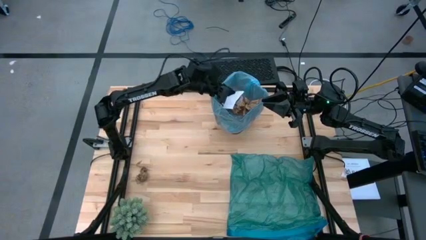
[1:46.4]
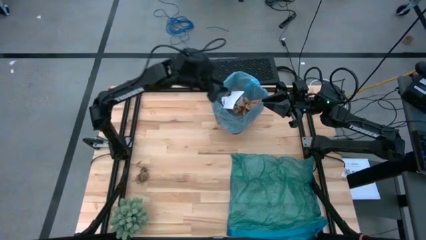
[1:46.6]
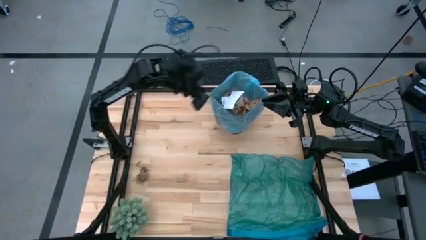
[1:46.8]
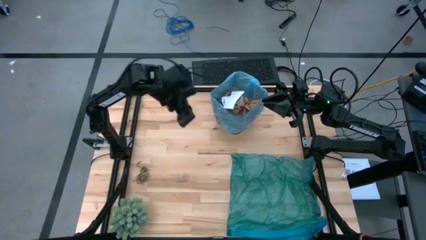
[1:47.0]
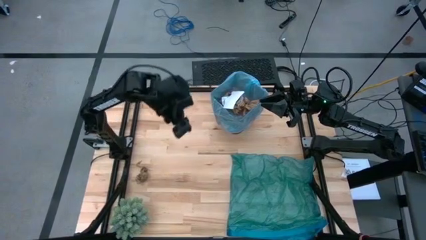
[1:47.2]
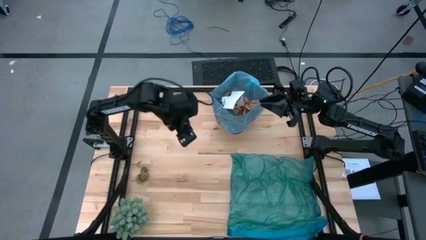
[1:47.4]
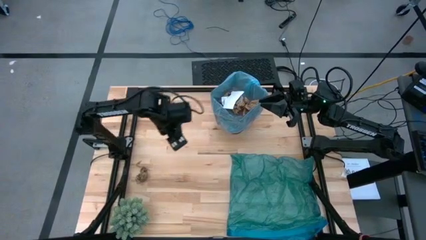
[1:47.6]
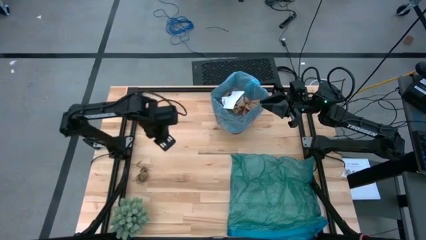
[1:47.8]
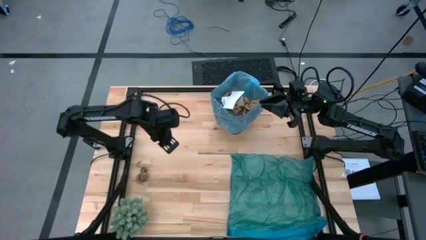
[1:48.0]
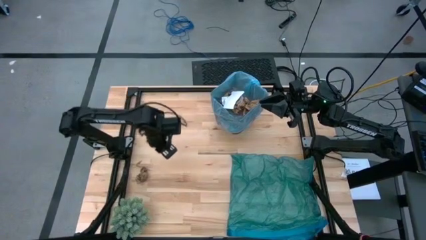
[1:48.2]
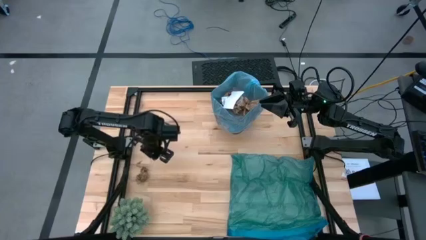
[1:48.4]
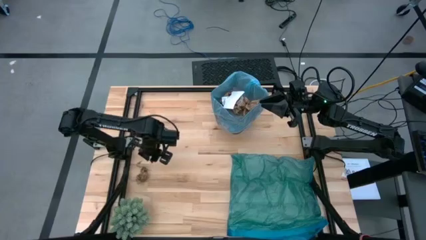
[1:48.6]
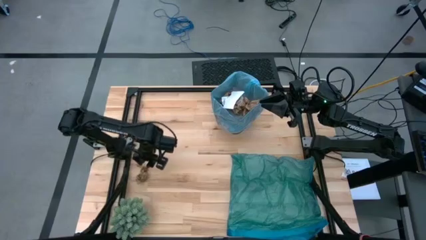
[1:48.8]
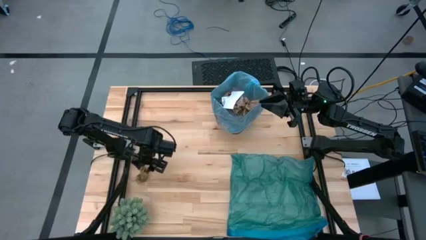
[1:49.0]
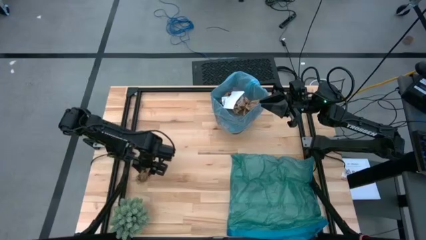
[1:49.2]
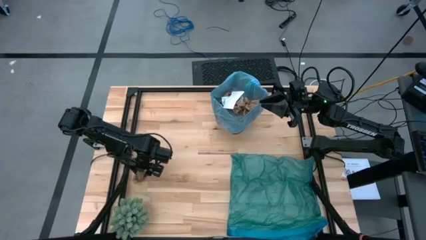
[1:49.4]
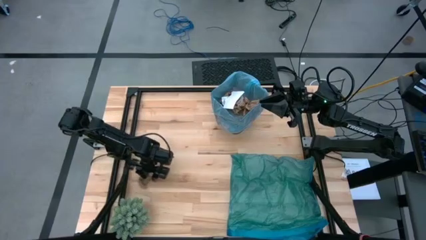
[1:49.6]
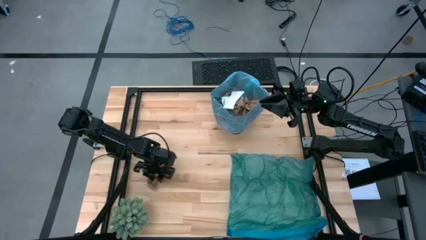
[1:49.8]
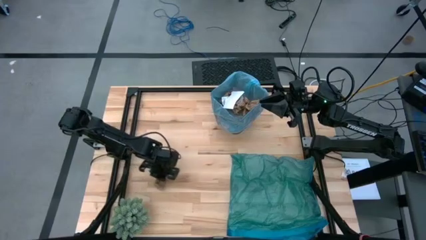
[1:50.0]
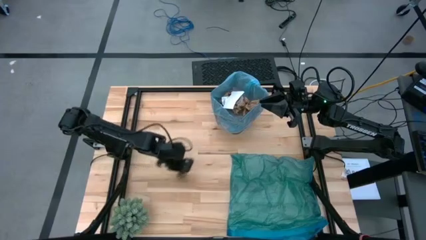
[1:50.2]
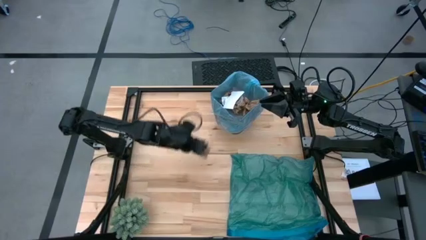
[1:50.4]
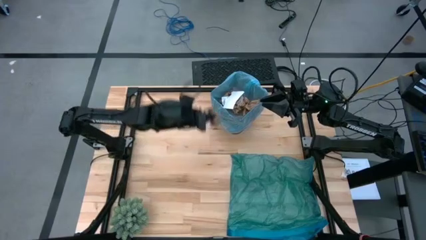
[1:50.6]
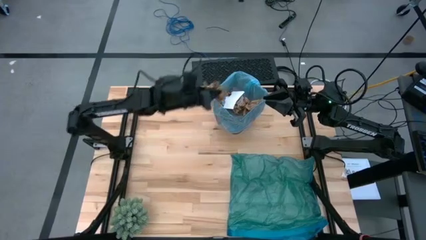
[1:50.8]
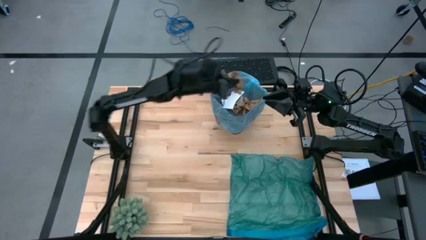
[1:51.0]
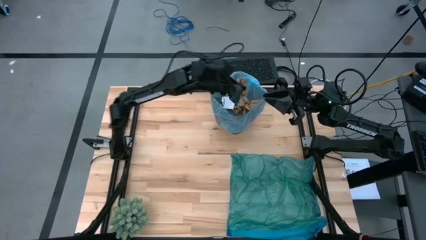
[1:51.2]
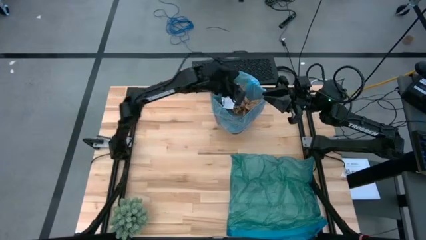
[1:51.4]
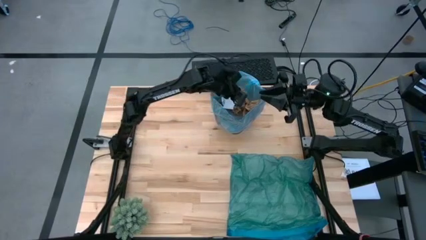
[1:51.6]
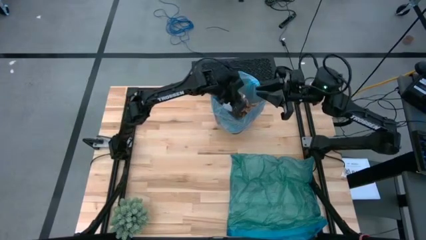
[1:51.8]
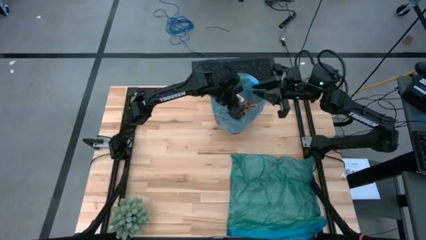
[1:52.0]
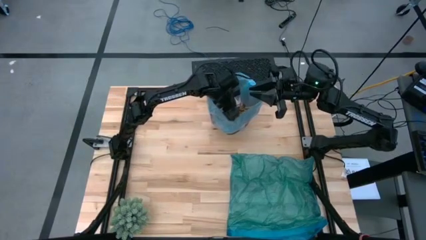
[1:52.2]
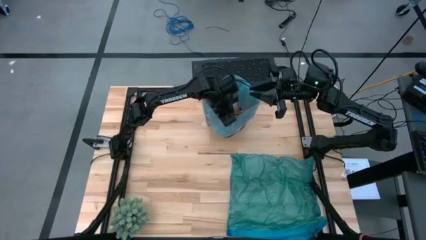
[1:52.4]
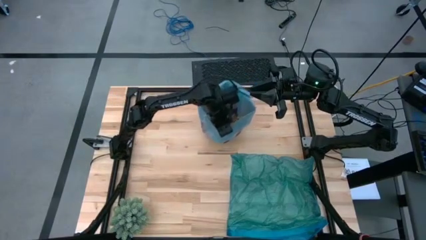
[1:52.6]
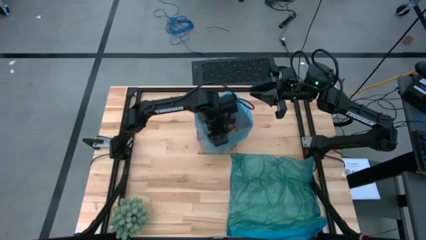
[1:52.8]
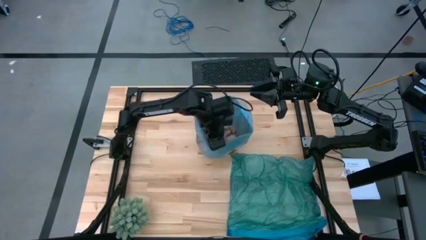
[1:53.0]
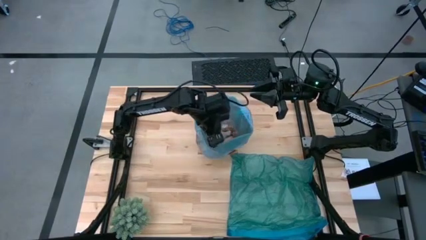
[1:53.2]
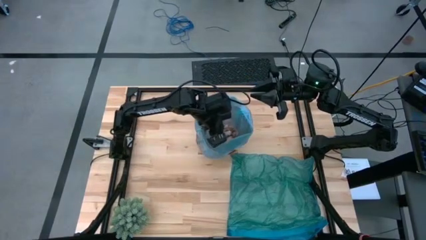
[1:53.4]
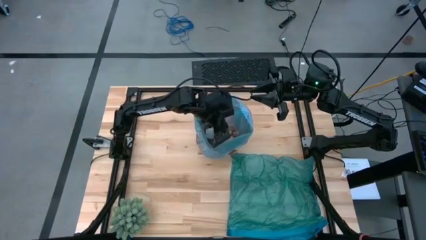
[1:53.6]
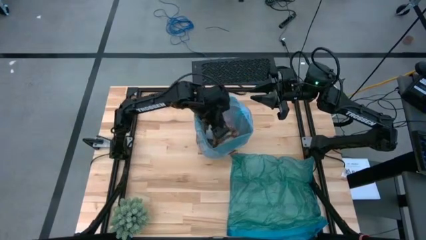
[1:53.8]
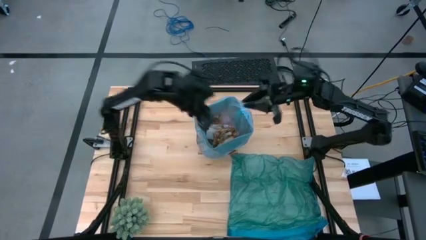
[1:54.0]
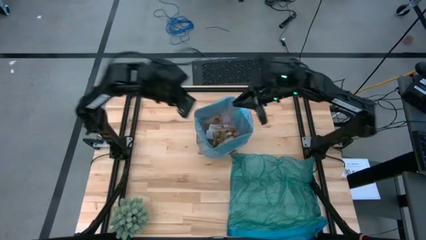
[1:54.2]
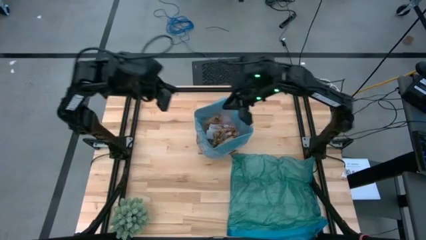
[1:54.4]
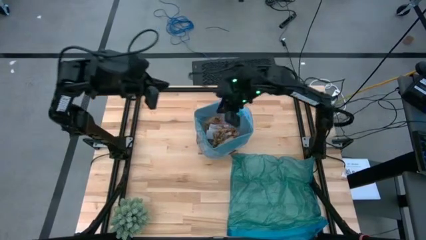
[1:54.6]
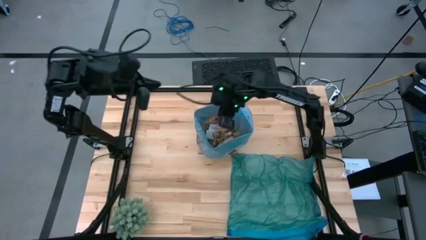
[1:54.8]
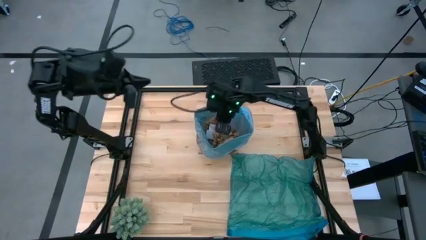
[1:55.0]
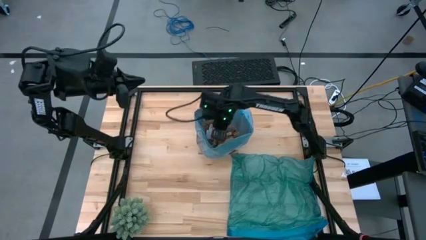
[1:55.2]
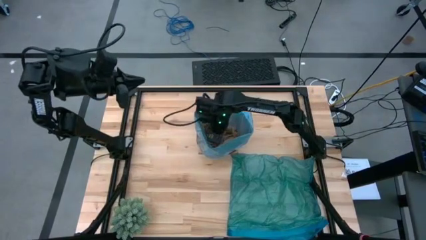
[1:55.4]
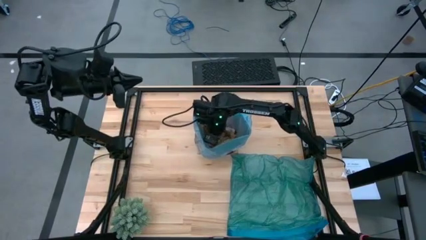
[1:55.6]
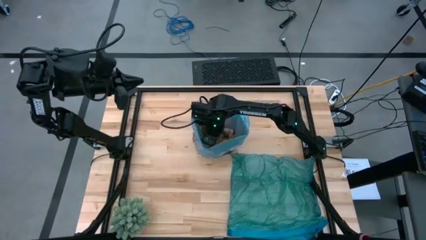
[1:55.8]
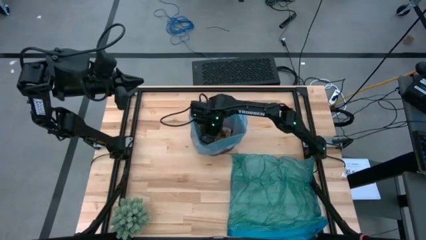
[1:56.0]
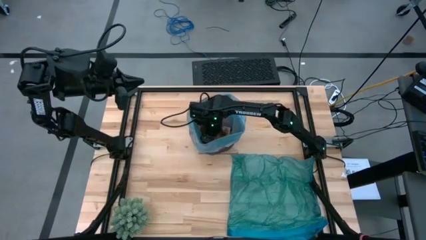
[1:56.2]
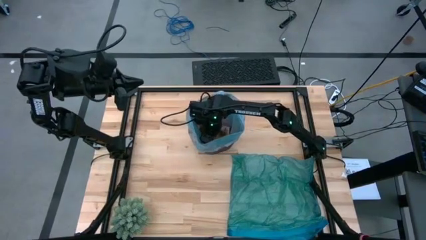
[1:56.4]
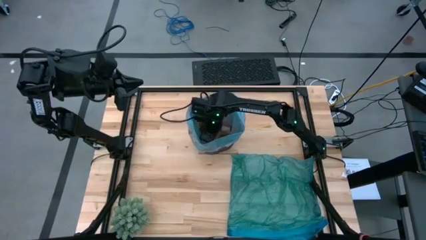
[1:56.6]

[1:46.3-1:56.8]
Task: place trash/remove bag and relplace
Put the brown napkin into the black trash bin

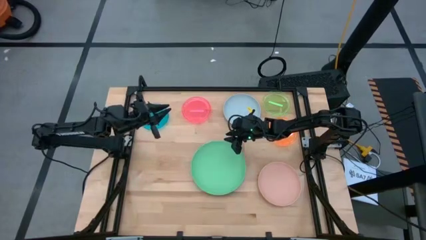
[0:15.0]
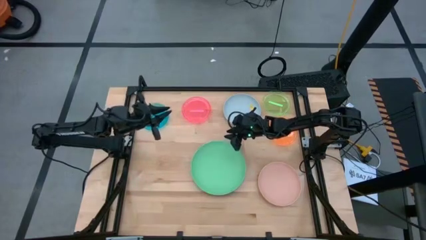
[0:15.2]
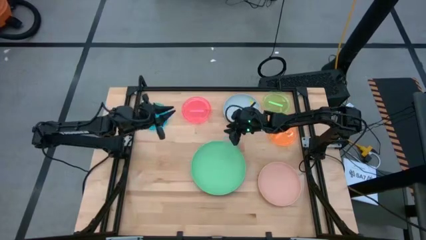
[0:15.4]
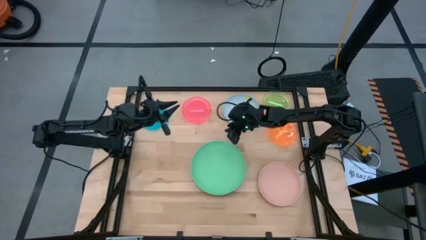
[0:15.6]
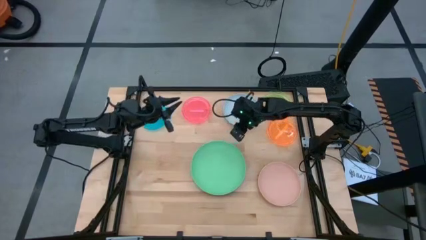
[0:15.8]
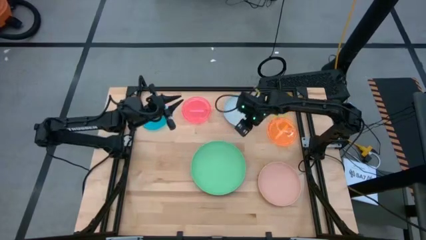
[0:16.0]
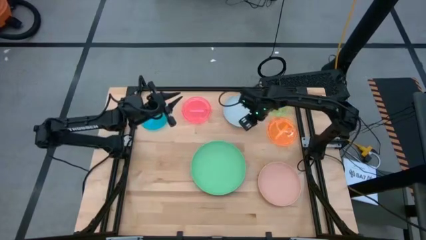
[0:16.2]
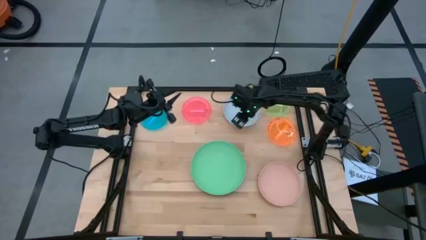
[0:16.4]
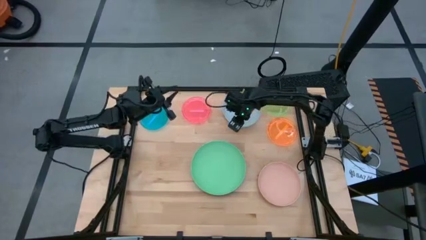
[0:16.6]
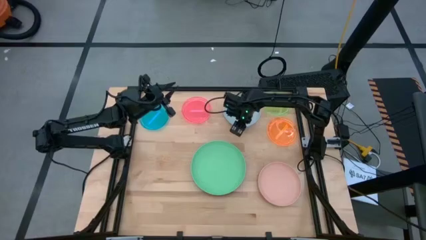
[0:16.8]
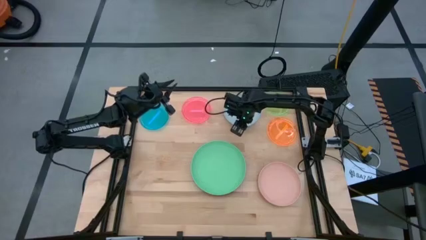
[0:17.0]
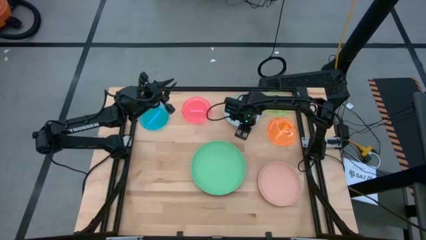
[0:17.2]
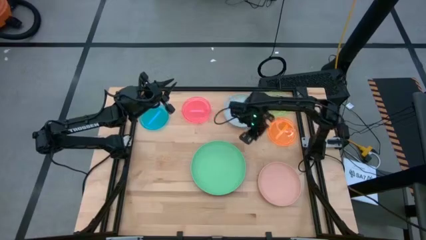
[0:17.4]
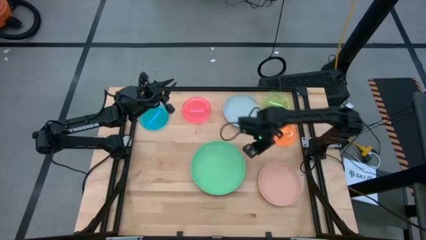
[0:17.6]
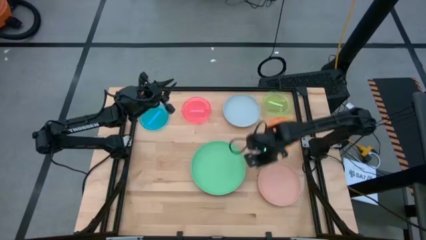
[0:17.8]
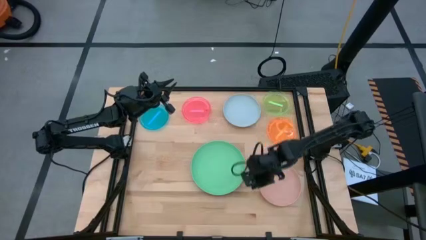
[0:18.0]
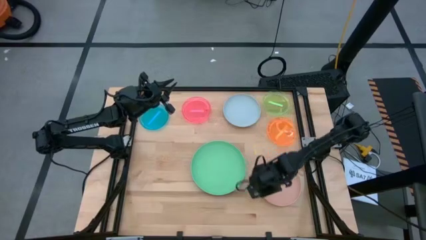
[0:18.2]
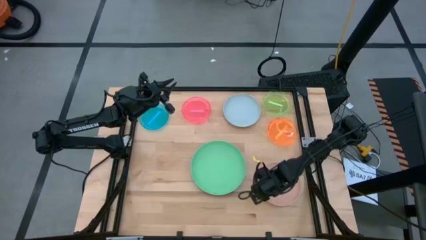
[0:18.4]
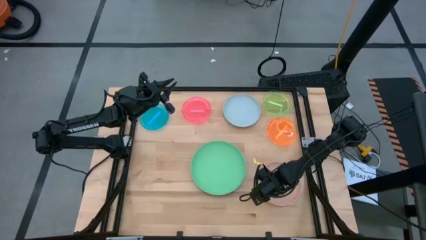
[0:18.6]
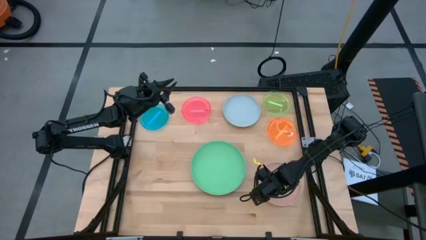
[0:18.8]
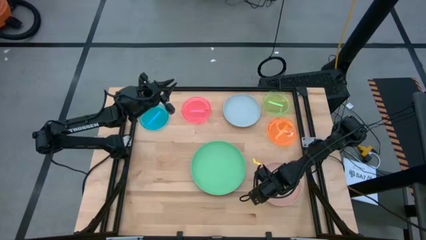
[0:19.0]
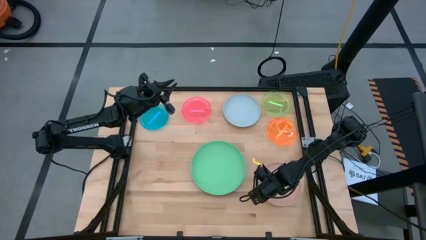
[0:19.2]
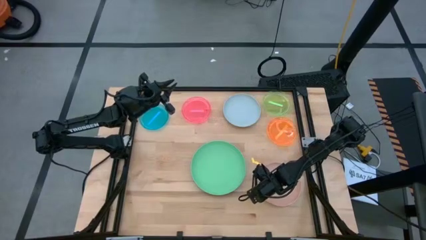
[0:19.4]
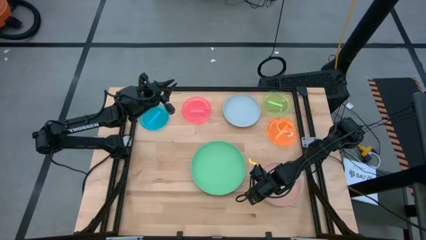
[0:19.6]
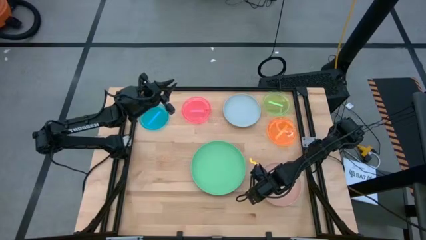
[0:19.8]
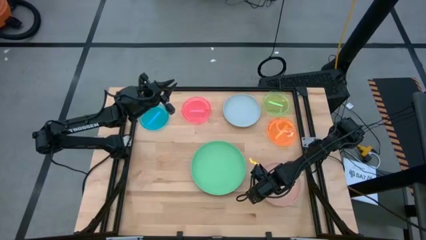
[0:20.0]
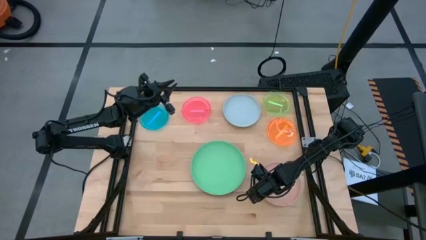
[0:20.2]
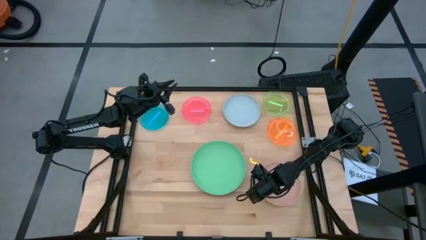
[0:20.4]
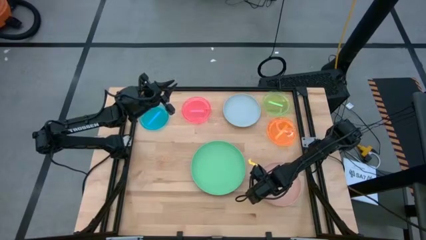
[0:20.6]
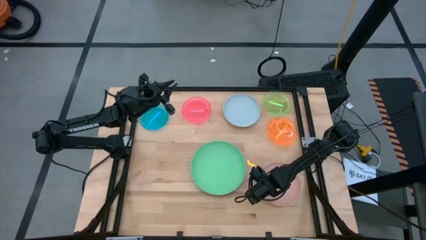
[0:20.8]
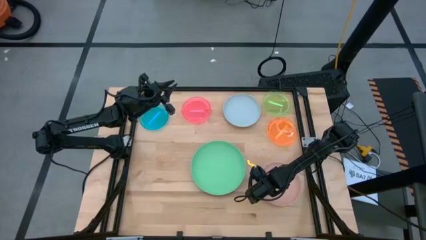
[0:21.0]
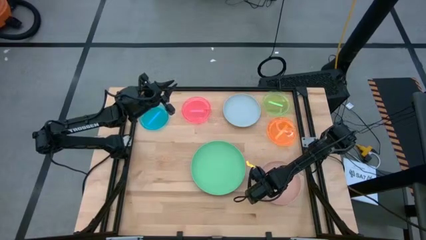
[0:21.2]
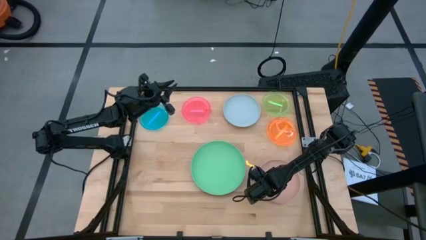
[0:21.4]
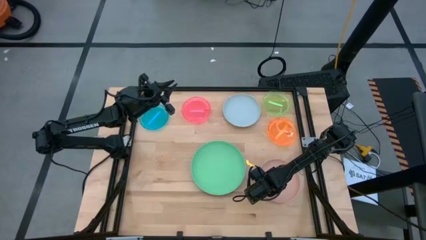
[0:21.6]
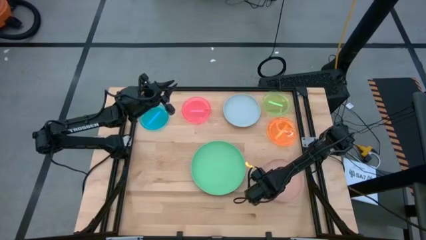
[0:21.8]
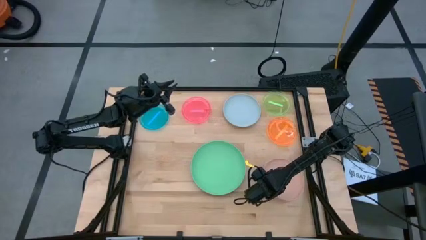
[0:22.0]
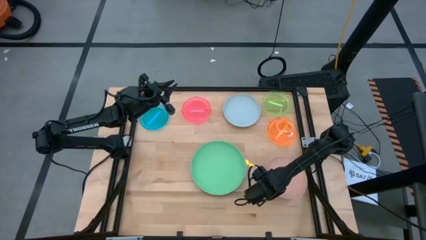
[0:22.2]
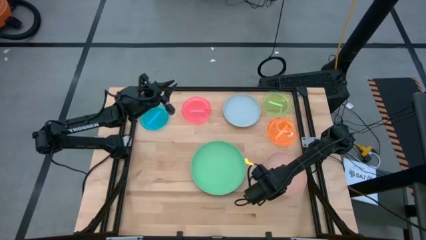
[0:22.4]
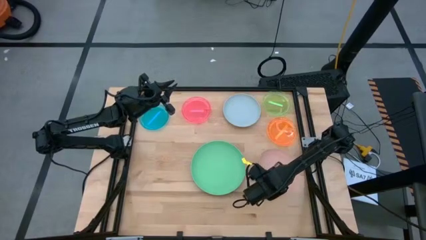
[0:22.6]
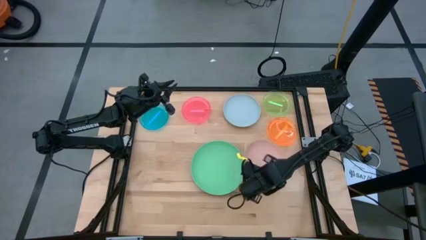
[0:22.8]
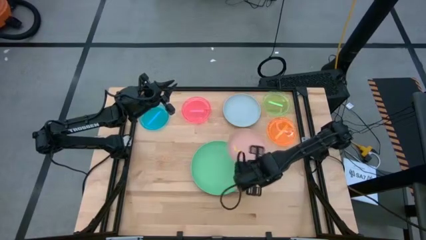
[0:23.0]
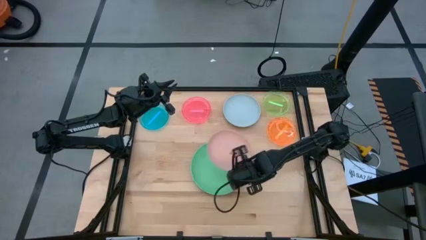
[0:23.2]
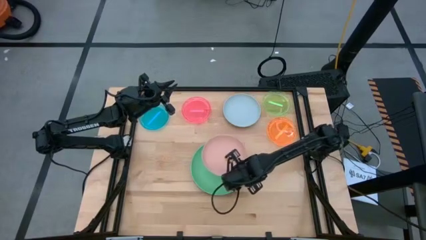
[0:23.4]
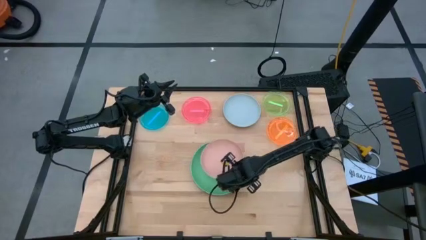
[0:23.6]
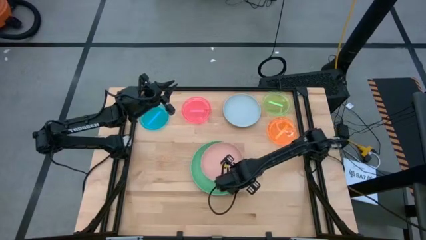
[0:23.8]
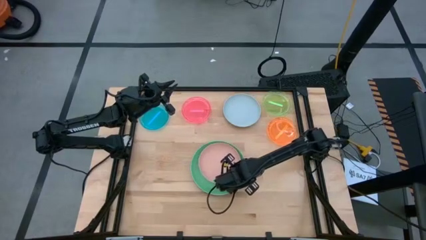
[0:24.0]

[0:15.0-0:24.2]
Task: Stack plastic plates
Stack the pink plate on the green plate
